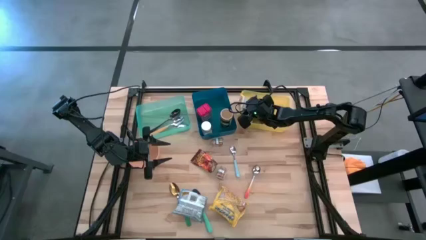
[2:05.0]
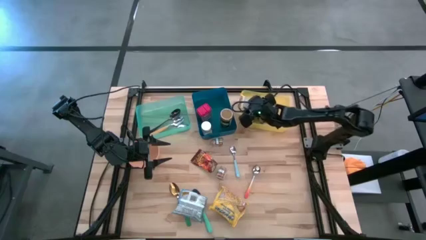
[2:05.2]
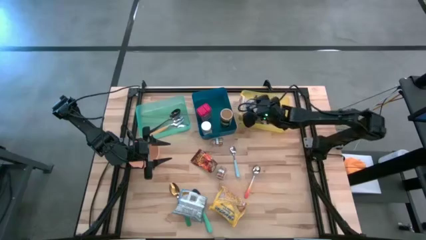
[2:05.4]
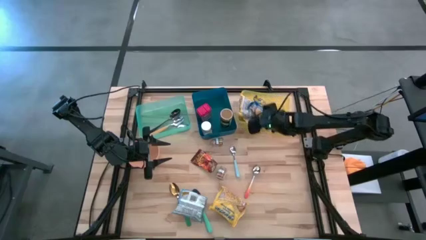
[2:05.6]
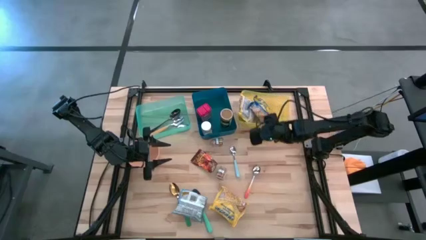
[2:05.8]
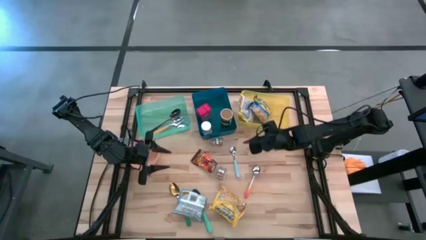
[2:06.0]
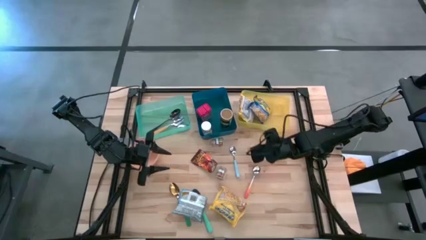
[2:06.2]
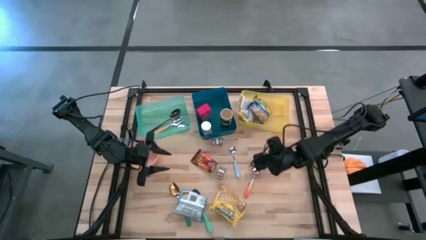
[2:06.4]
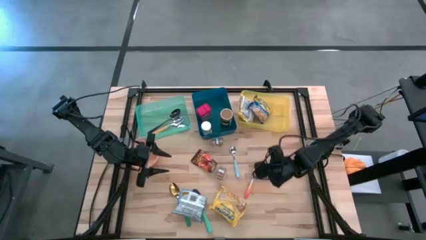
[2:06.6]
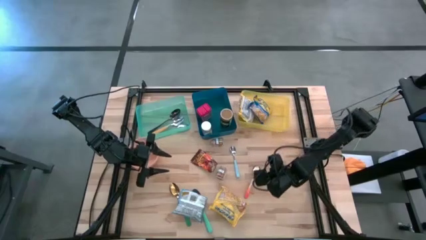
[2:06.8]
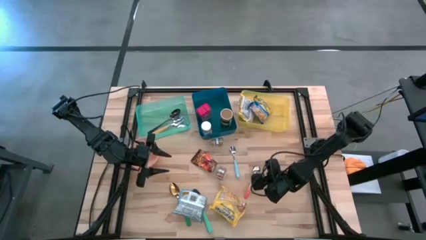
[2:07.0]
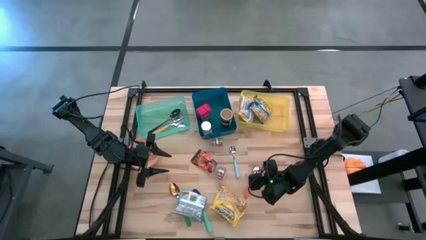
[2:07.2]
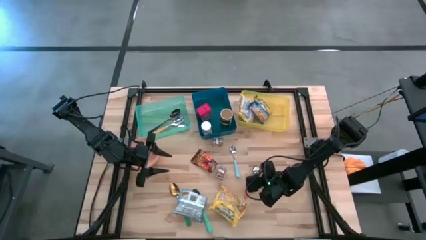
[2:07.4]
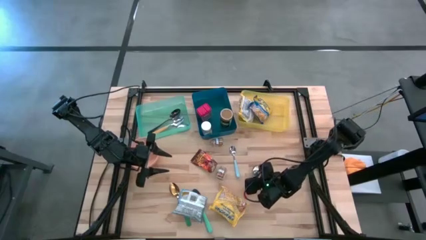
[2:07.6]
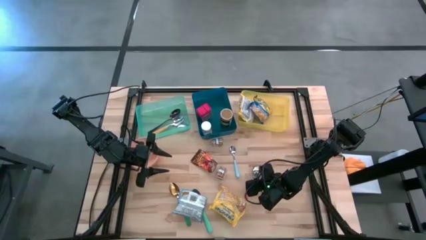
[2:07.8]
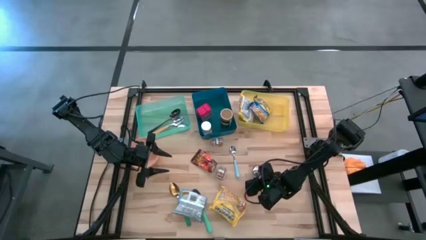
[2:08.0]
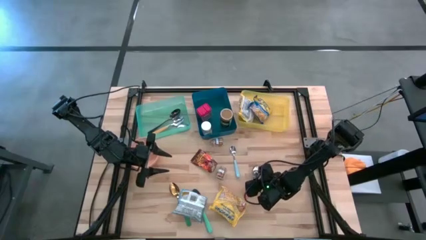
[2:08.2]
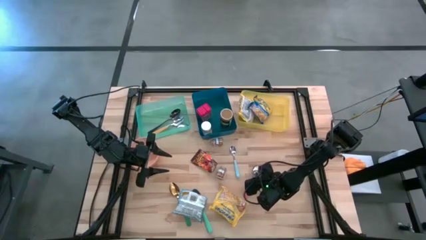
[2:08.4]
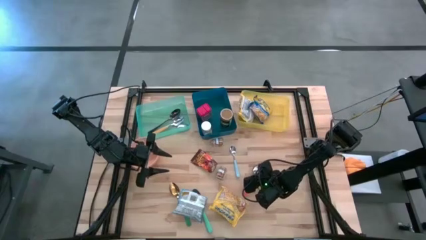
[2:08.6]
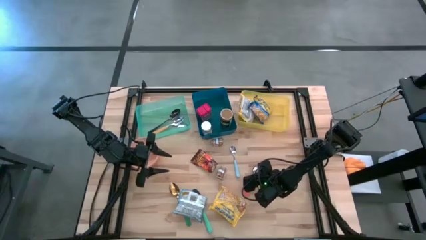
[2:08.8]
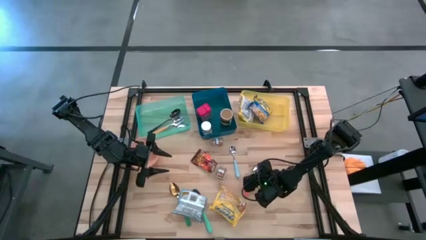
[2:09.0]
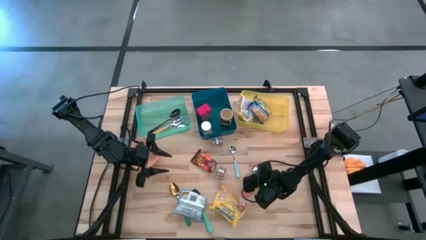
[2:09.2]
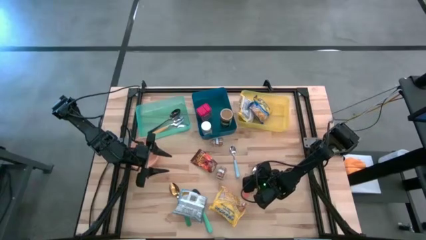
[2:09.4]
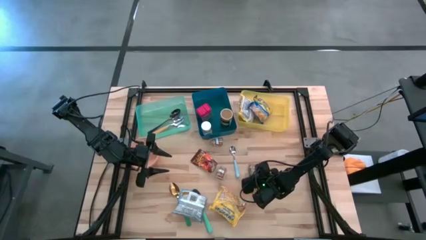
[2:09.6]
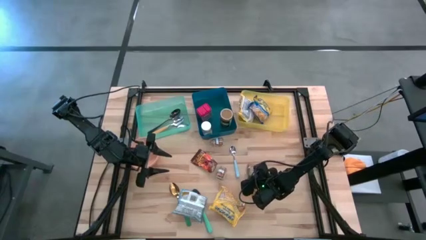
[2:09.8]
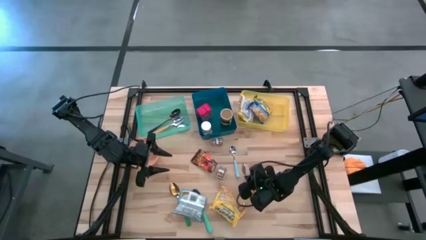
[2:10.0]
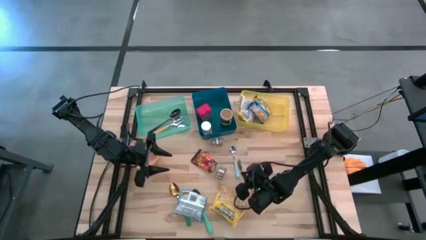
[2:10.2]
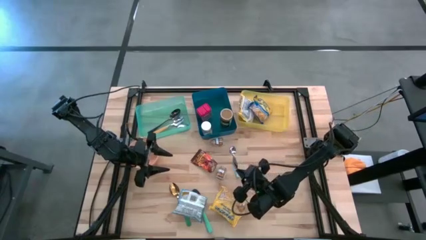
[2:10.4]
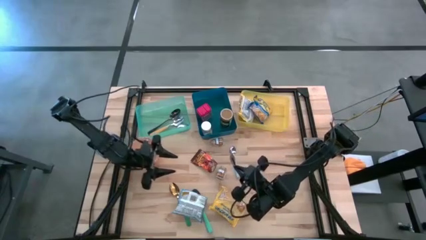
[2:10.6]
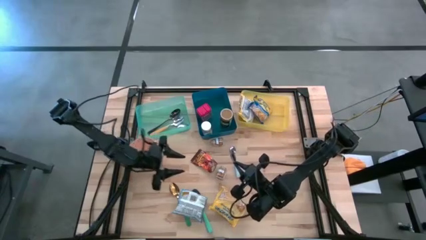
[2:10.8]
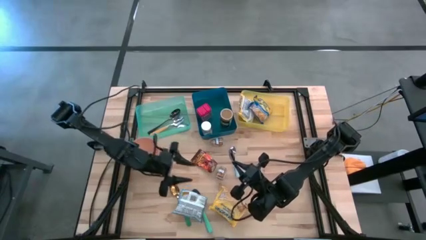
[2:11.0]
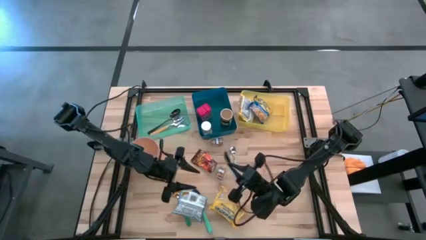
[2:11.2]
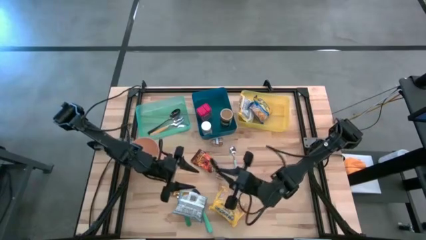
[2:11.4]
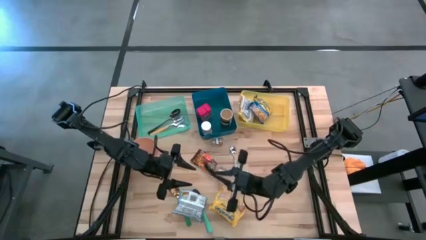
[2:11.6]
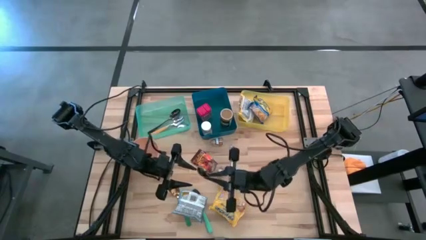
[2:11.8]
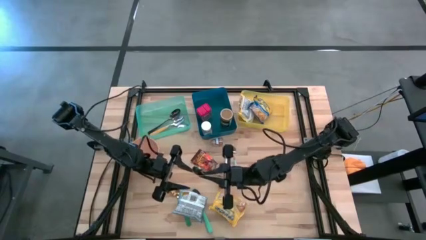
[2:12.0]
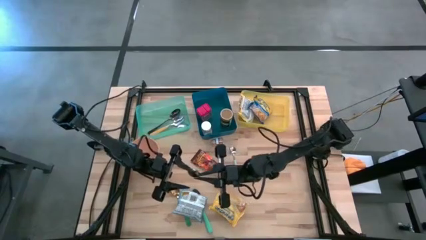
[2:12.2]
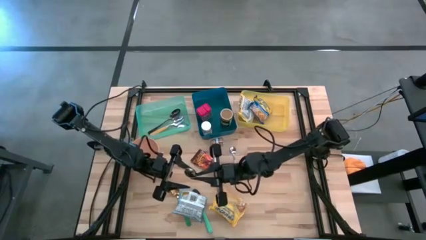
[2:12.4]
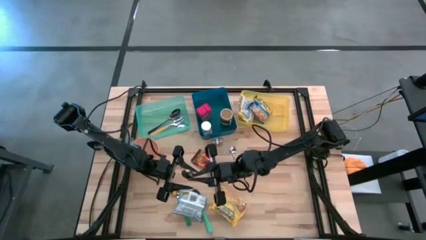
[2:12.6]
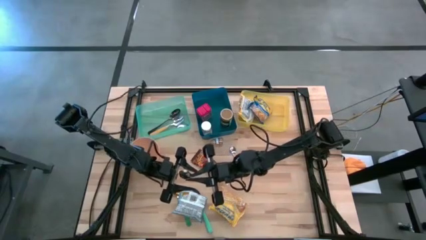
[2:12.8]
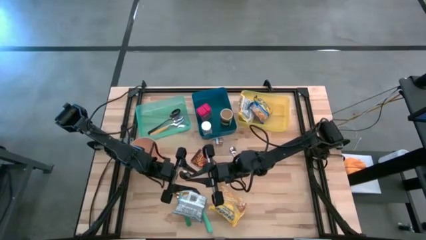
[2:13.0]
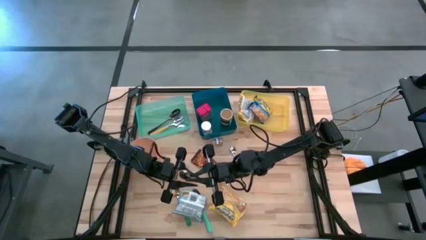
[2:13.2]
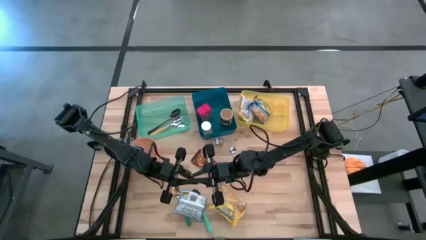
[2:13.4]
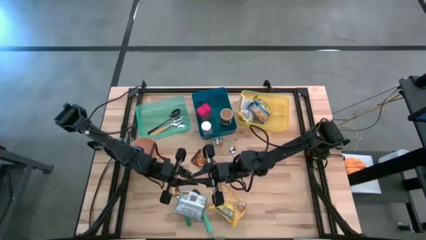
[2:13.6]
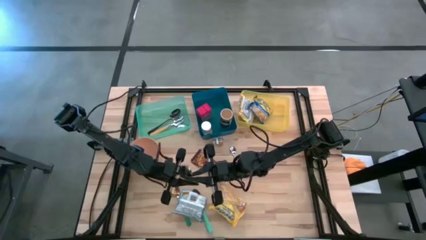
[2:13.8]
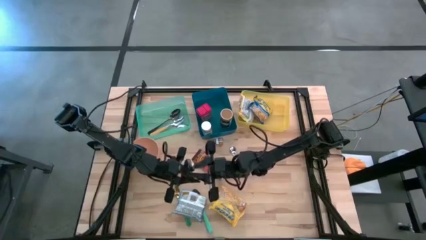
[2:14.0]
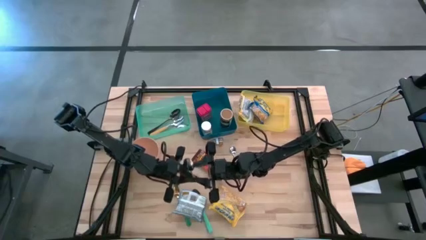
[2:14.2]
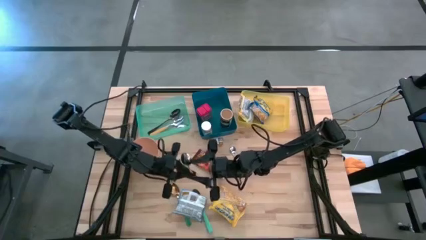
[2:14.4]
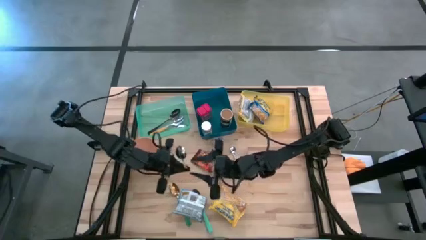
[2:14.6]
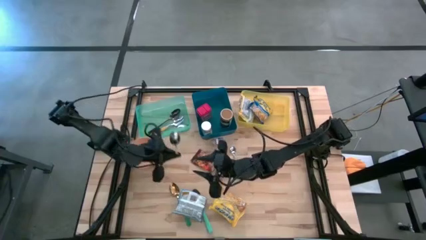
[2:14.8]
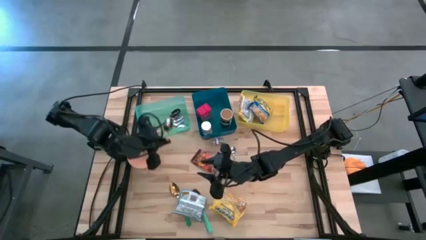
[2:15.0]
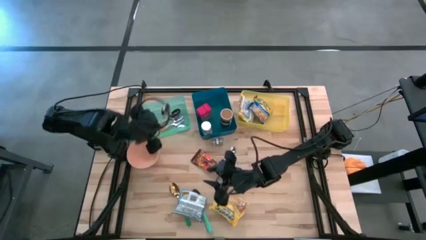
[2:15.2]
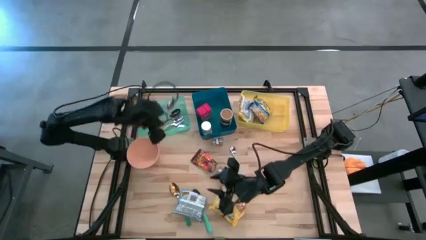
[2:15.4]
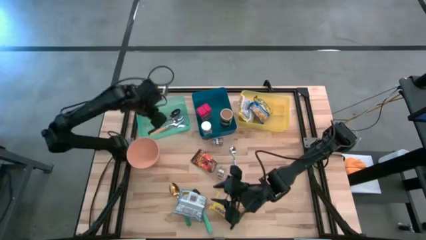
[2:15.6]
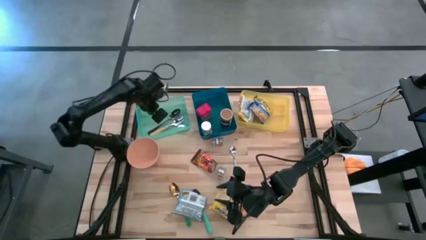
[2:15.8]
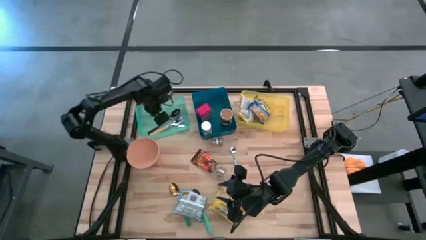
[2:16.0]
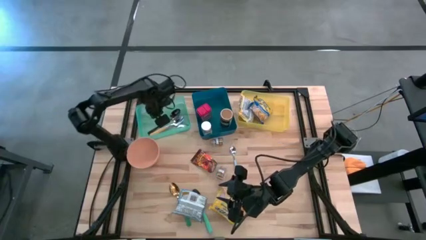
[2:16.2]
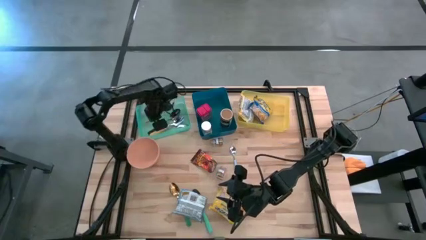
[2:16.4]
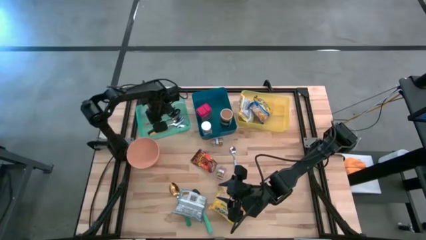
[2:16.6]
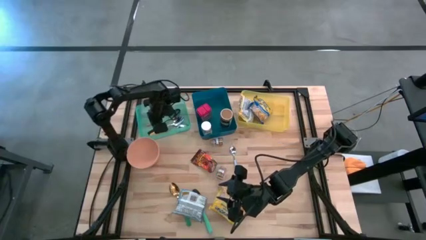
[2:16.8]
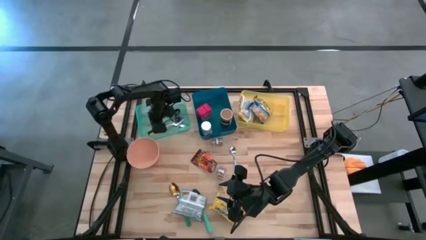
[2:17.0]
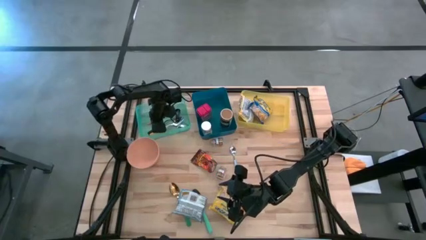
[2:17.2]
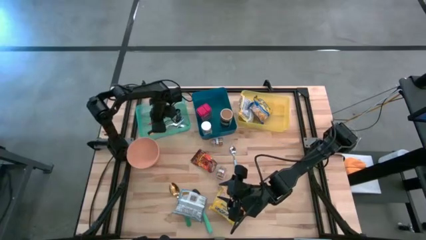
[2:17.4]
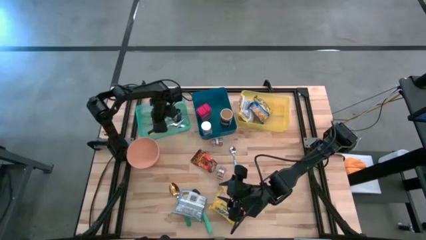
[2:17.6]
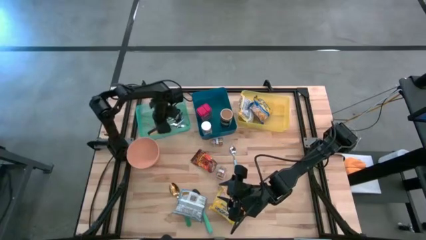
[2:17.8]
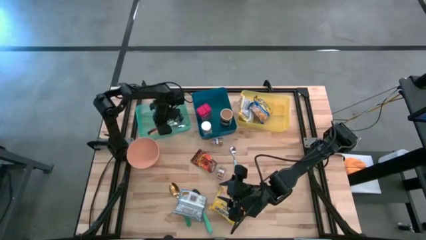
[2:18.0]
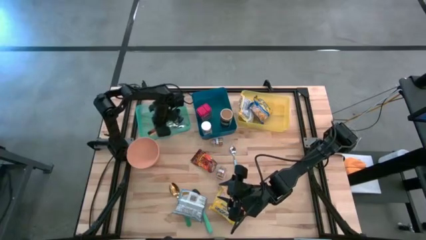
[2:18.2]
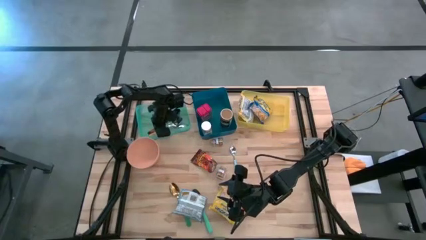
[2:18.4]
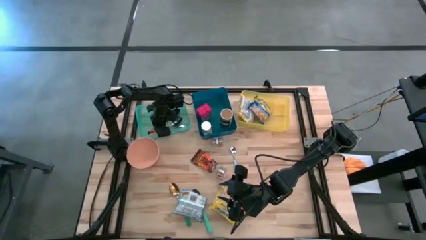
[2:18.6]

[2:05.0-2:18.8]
Put the orange spoon into the green bin
